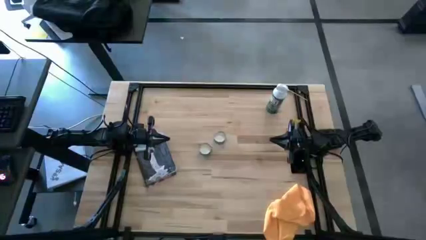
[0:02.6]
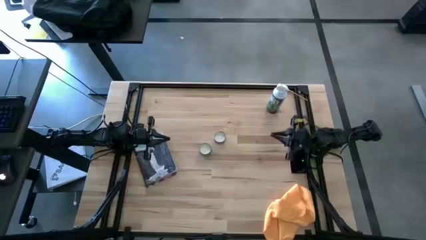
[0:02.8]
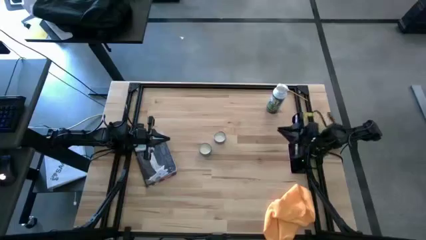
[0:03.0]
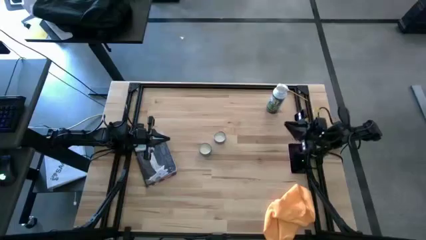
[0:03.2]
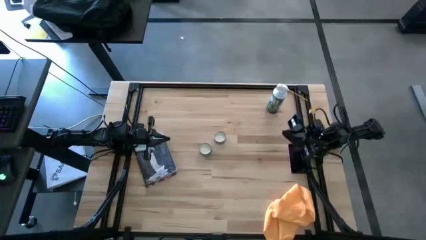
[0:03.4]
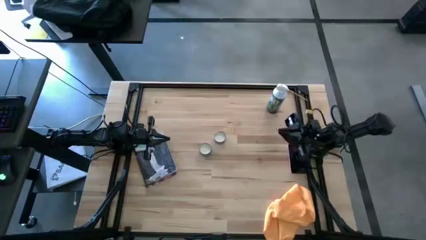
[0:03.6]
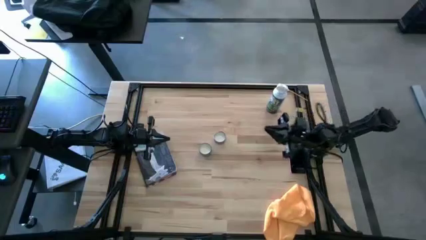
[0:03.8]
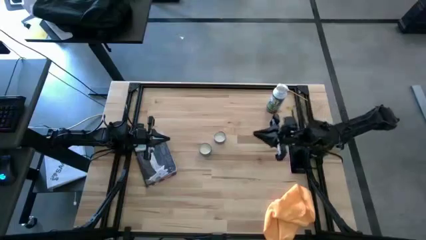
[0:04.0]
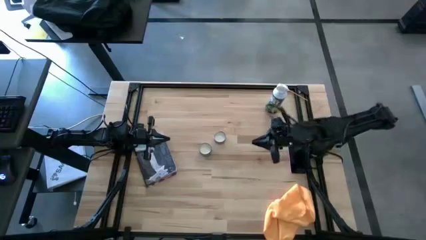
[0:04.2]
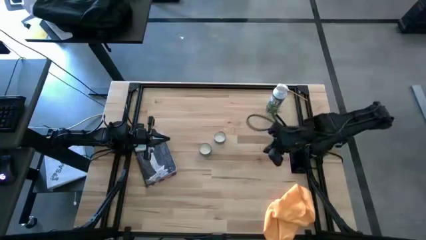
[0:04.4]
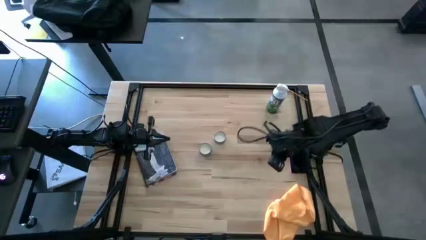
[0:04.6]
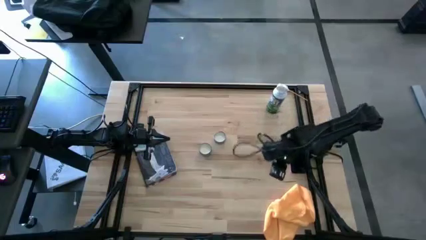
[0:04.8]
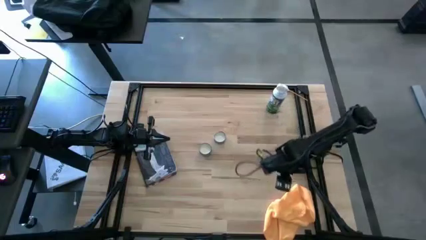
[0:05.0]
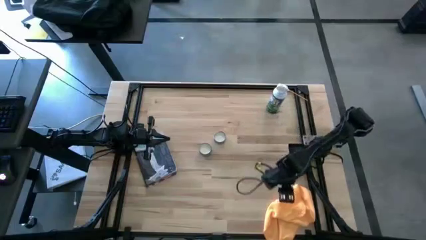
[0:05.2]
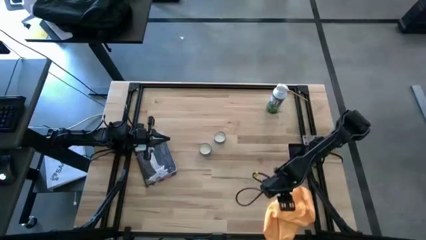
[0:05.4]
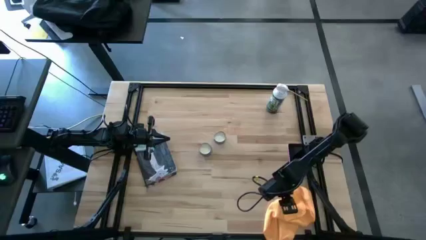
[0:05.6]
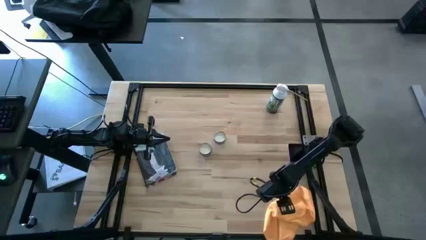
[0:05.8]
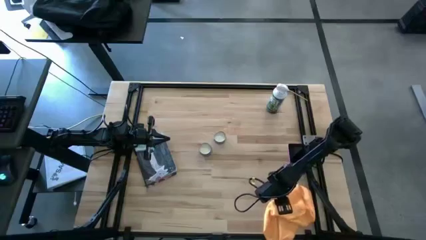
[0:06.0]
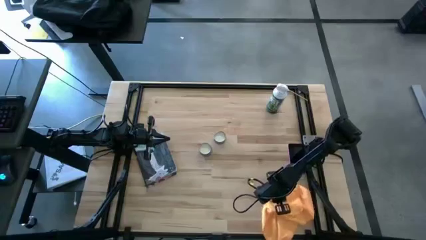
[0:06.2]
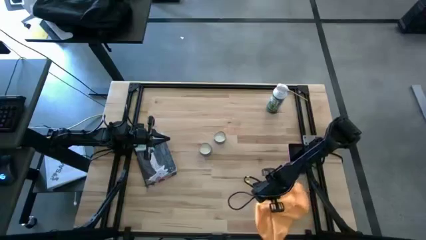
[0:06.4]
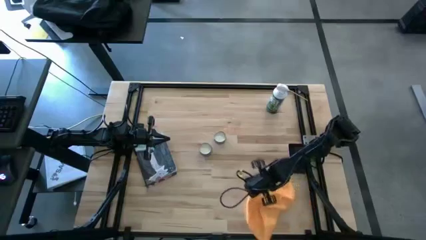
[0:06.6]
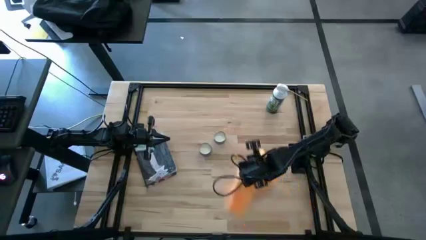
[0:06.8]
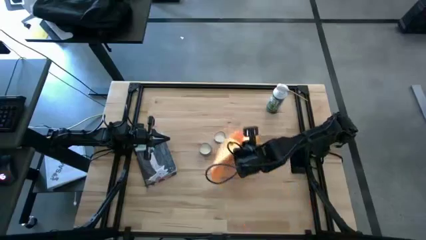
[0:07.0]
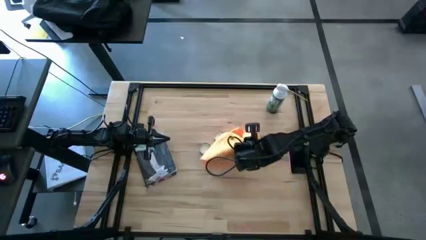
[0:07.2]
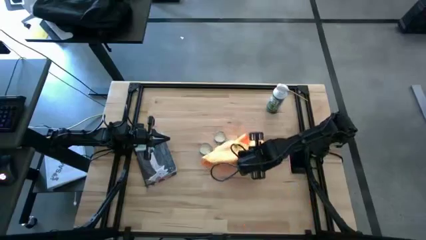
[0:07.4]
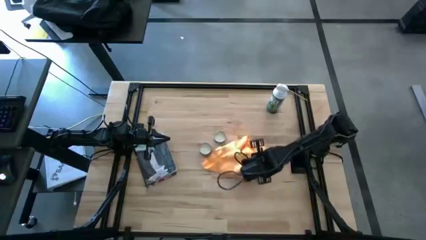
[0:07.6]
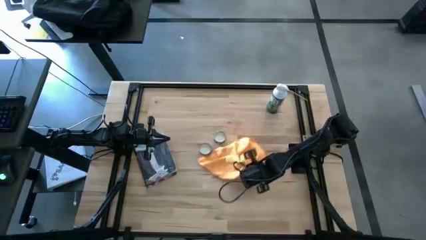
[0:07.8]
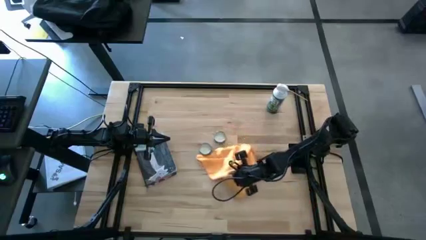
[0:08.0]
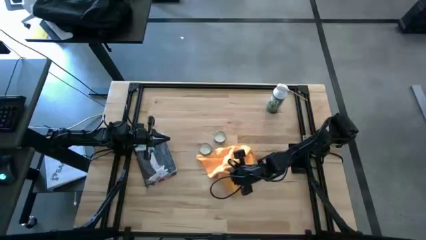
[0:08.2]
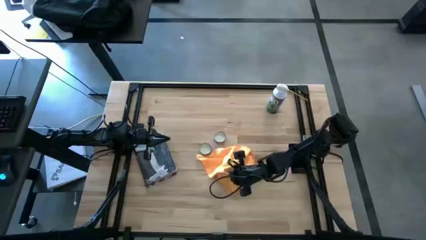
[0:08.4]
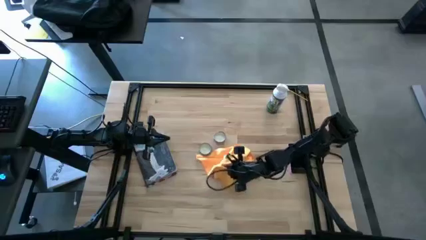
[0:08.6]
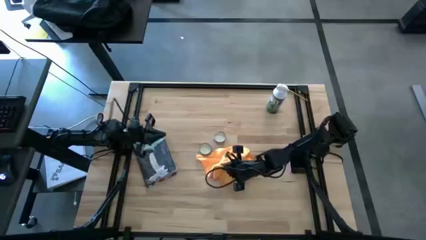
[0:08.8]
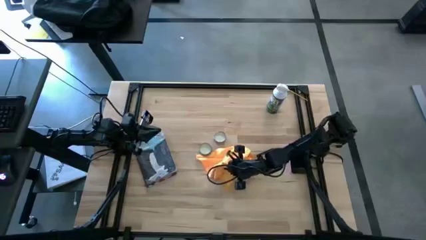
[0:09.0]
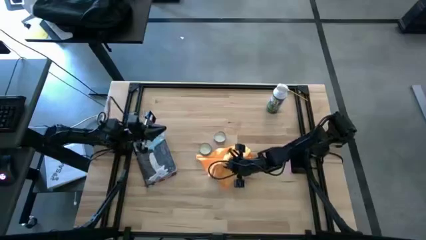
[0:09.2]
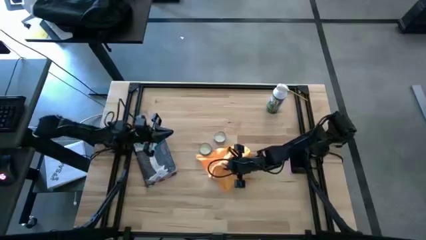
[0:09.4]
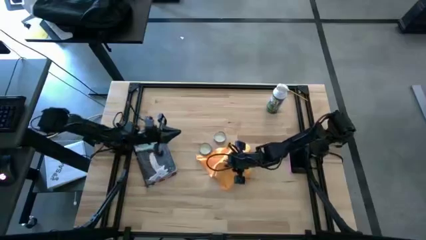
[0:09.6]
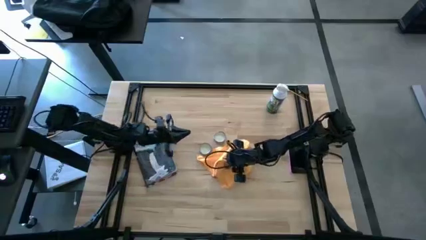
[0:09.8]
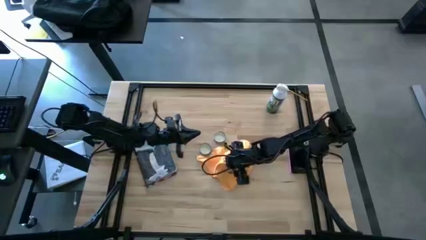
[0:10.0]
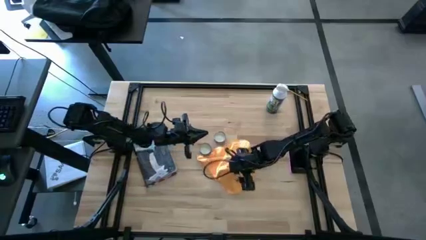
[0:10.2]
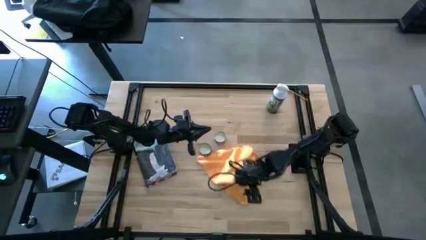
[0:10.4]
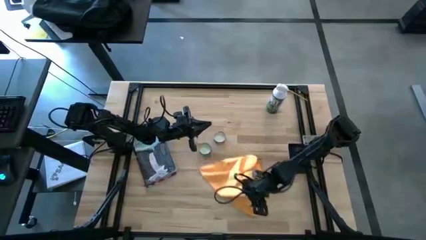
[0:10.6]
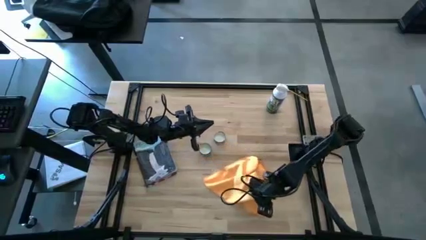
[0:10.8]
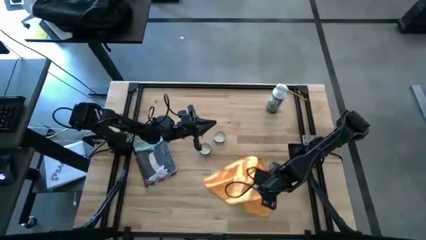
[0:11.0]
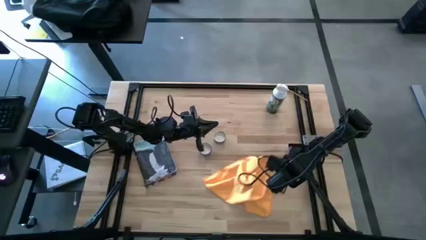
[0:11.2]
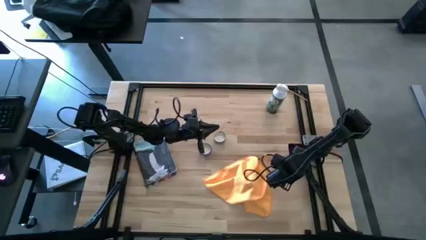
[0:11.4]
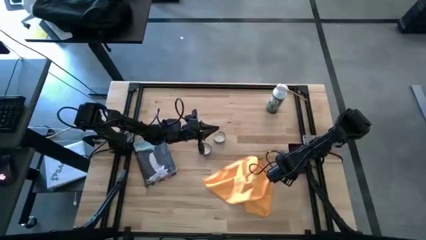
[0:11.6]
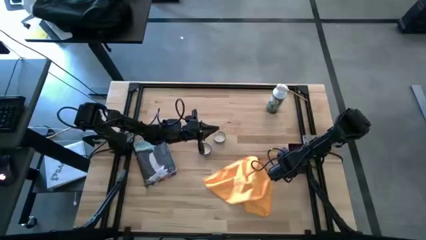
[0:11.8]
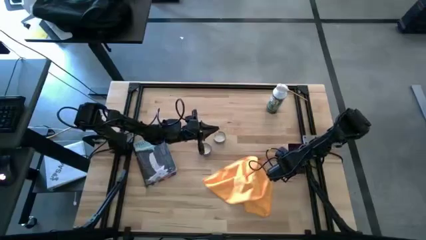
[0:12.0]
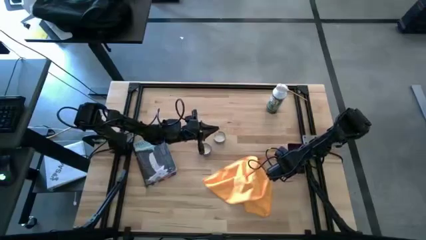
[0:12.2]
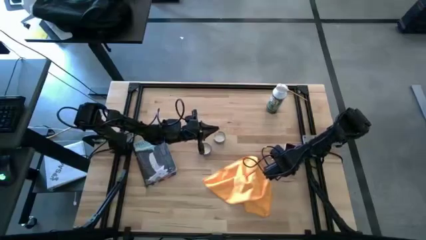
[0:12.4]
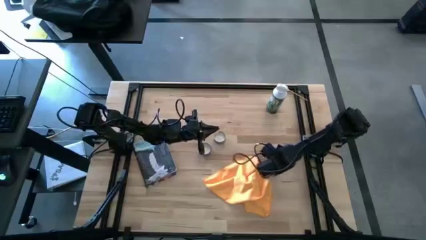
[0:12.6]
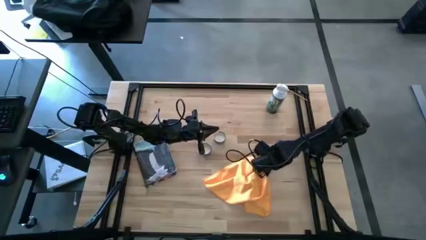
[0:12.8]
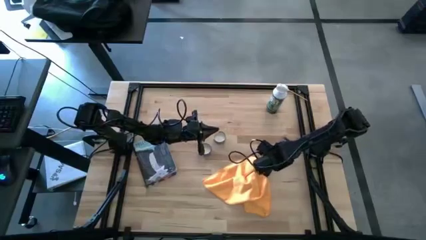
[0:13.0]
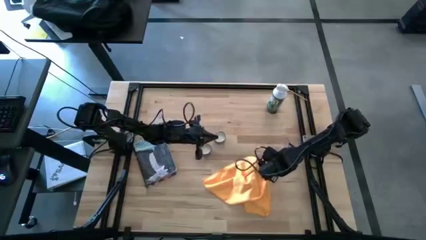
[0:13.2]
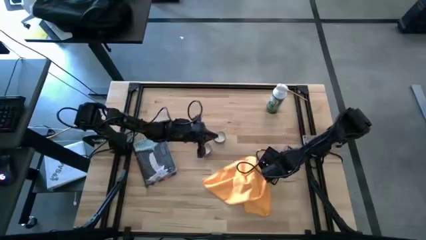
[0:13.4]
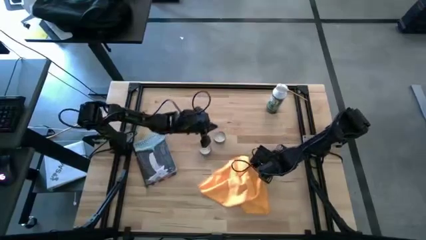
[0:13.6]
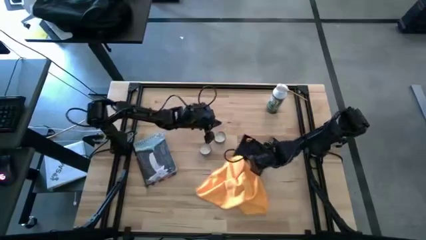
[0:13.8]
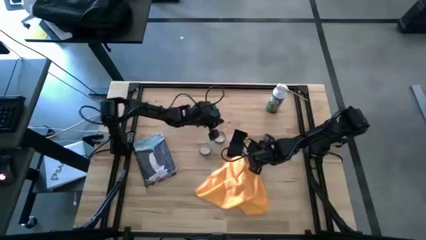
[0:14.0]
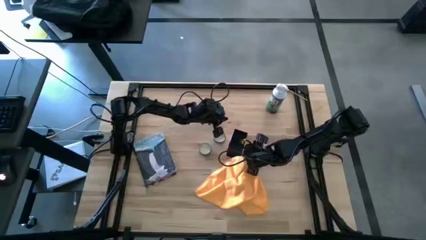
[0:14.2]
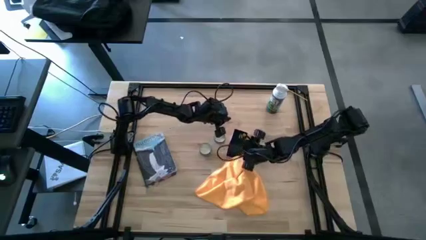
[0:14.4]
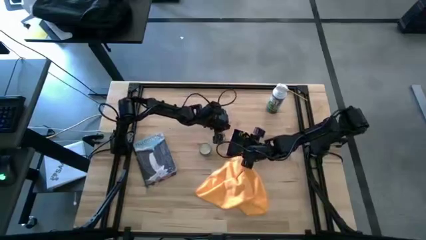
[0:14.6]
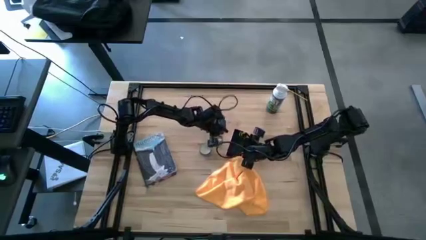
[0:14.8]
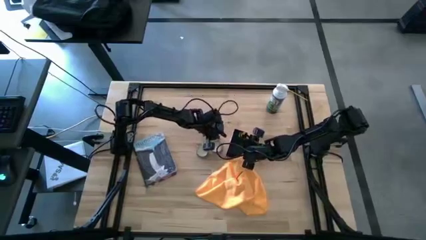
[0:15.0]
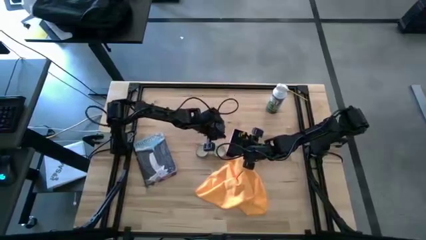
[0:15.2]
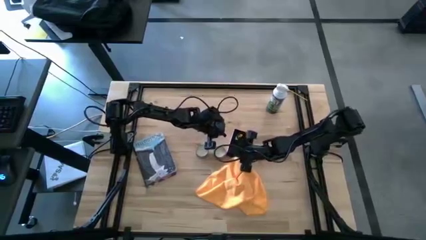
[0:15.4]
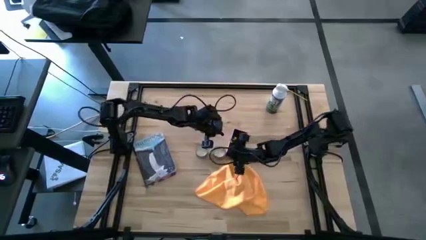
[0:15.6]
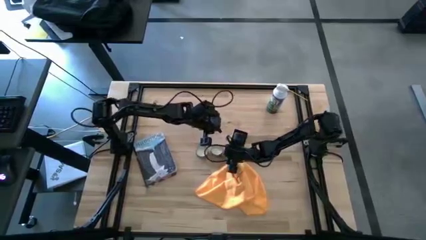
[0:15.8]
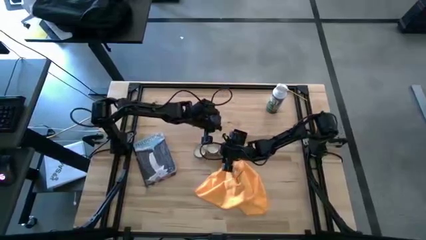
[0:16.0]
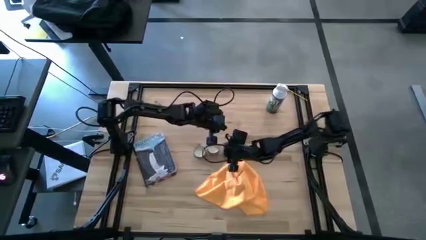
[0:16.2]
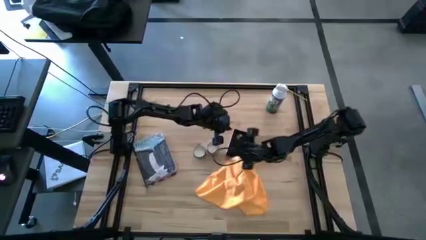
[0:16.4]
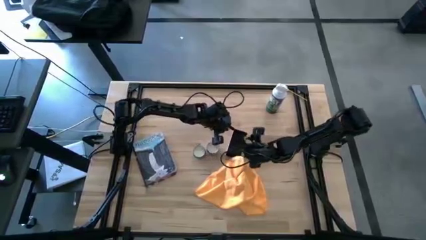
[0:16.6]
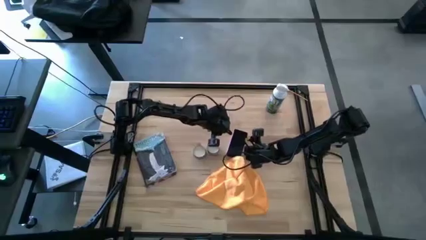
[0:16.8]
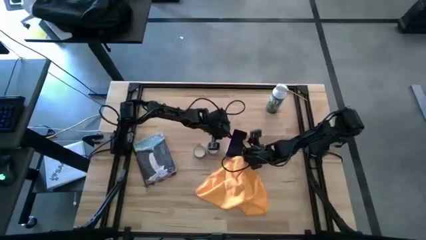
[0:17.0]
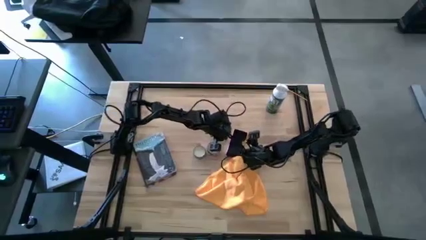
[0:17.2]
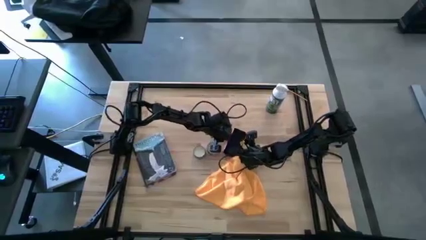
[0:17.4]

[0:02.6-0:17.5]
Task: Apply microfiber cloth
Spray the cellphone
